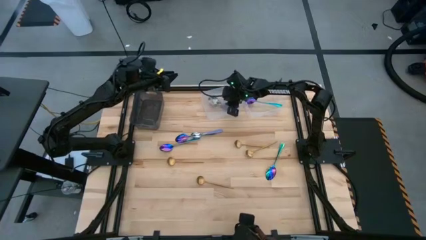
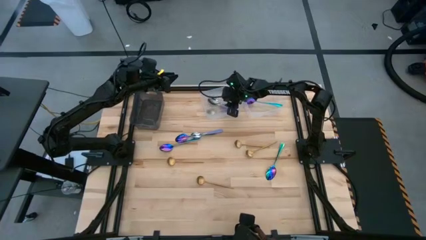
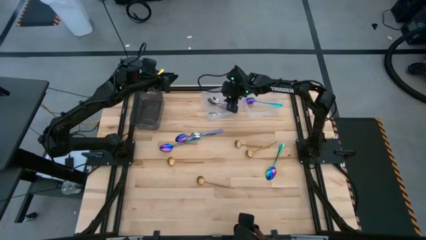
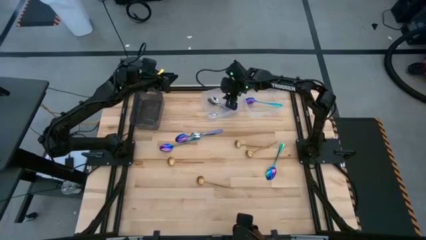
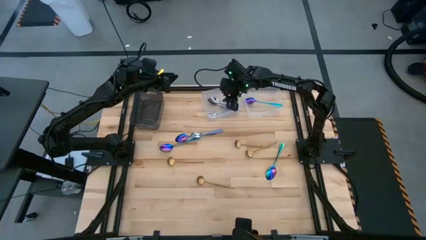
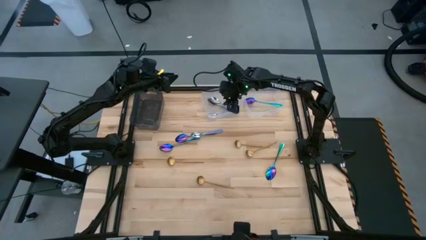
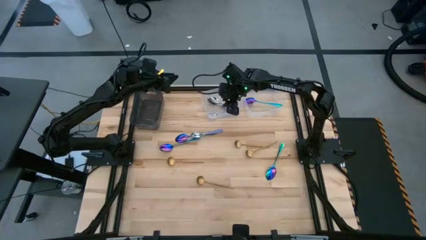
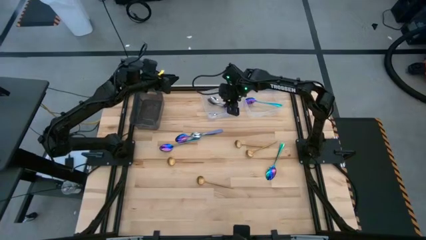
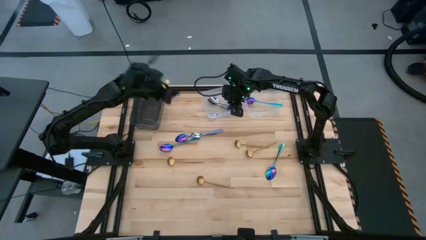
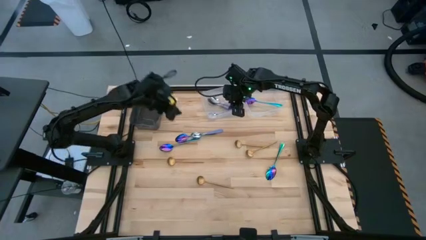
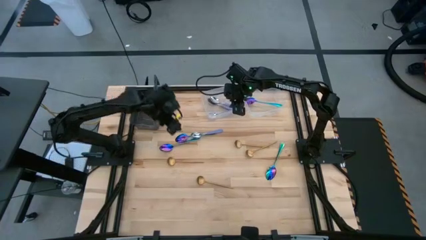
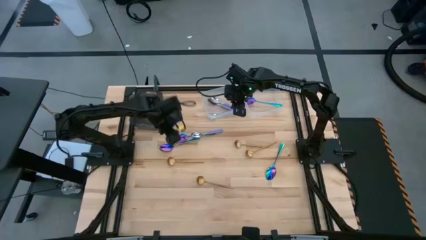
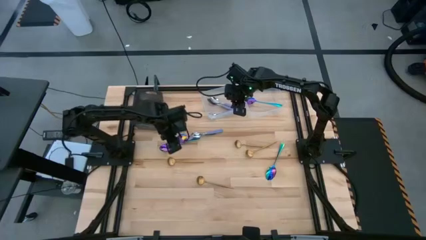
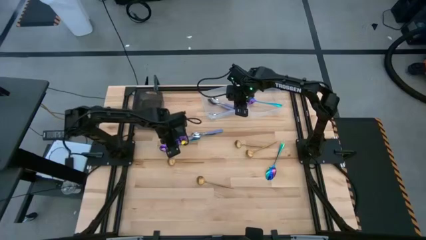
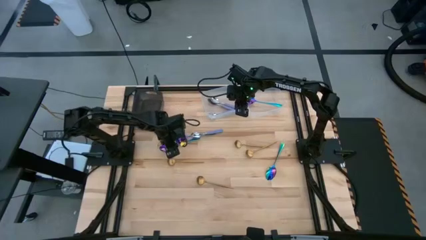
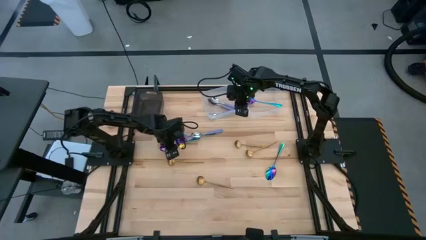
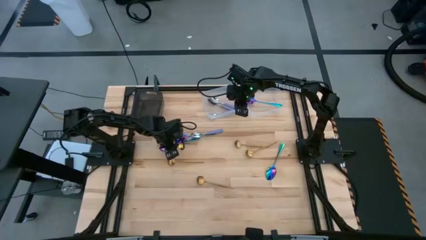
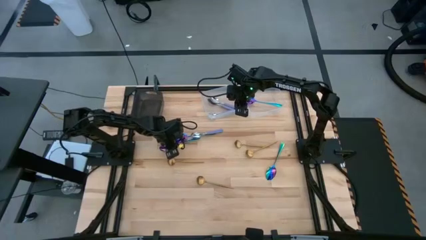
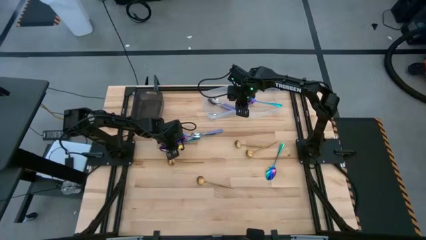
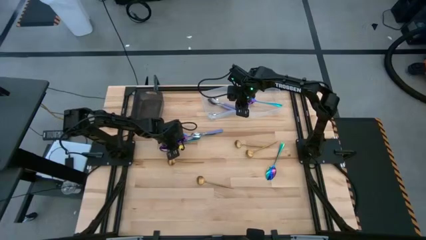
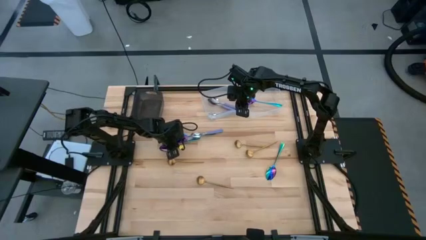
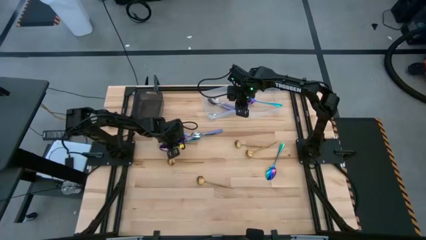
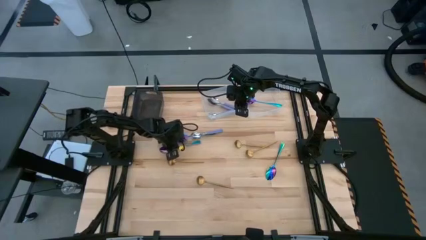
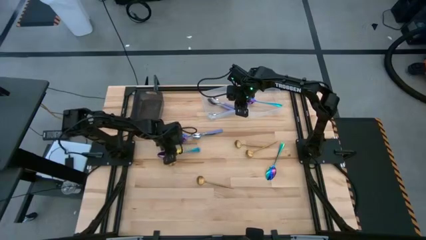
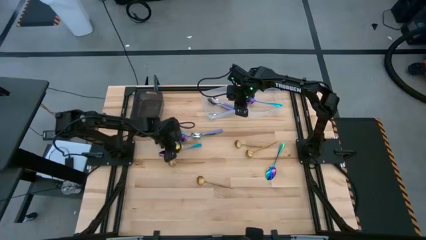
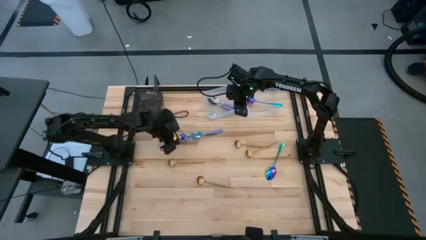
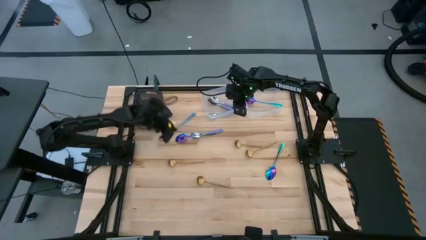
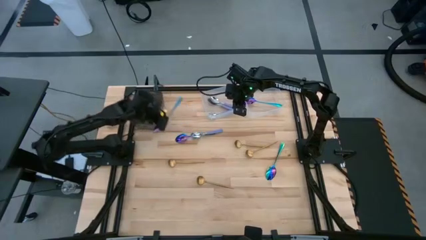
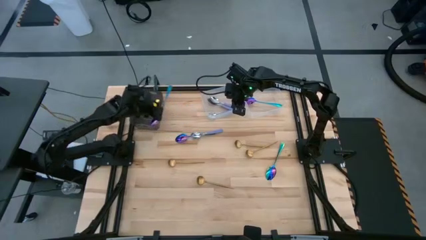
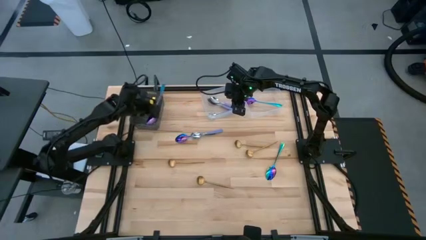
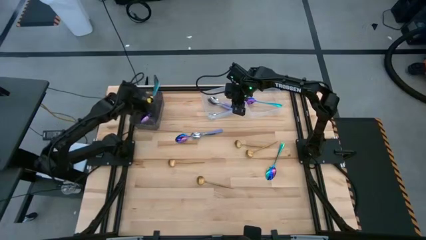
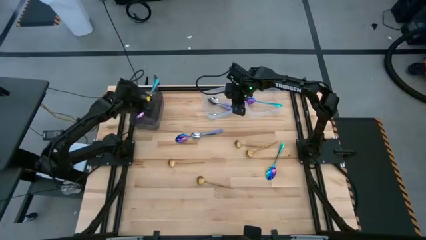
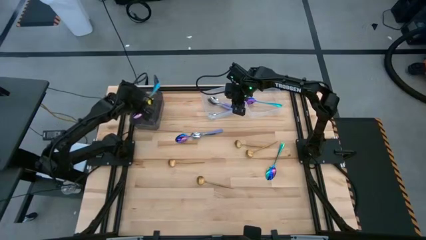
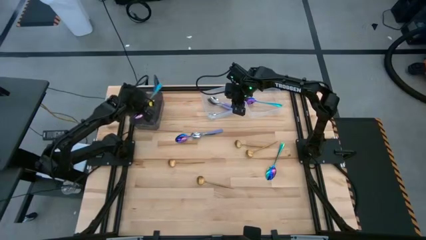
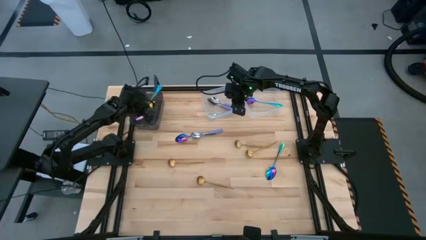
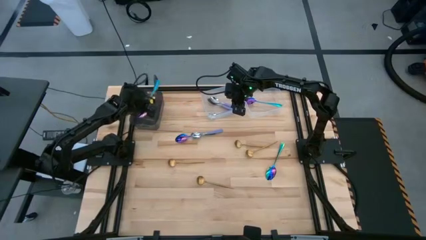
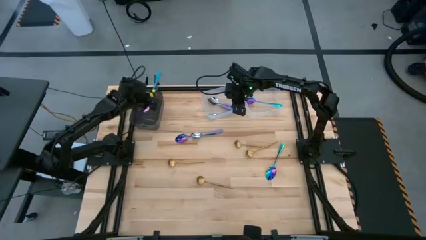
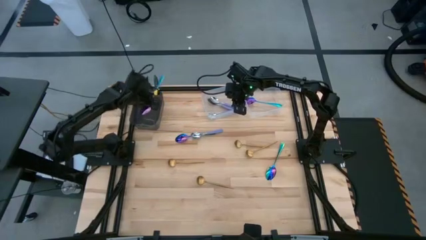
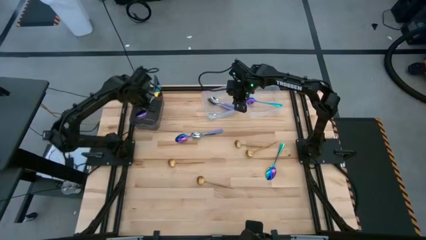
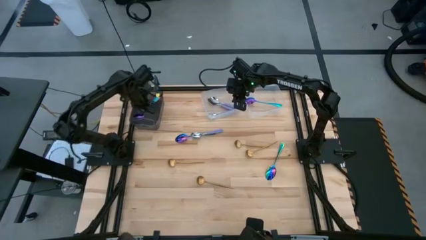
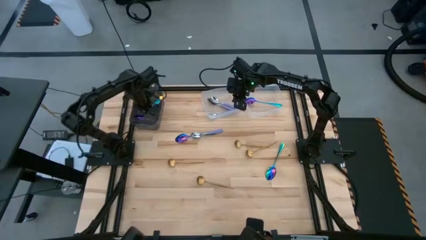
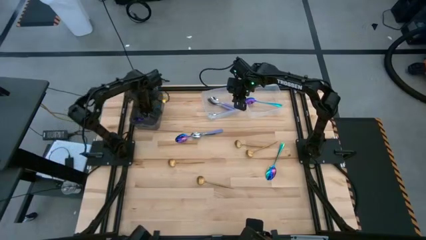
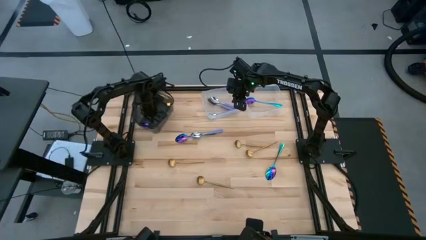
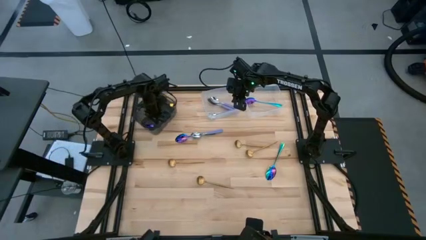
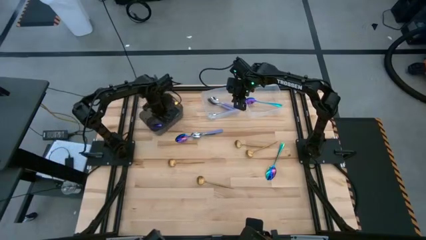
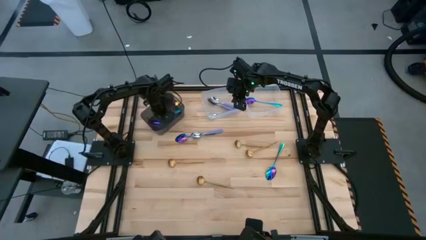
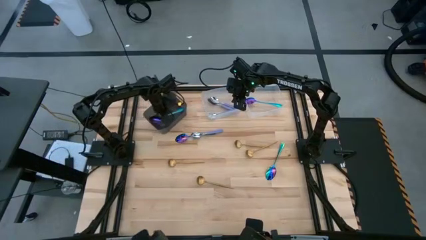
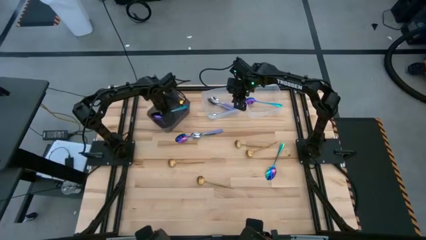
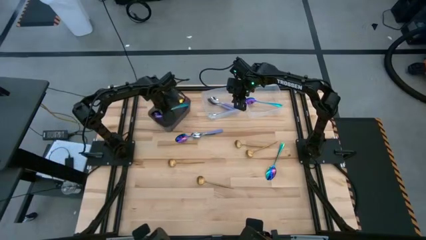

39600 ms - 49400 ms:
Task: Sort silverware by color (type)
Put the blue spoon into the right transparent bin
